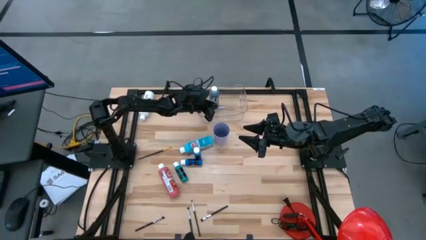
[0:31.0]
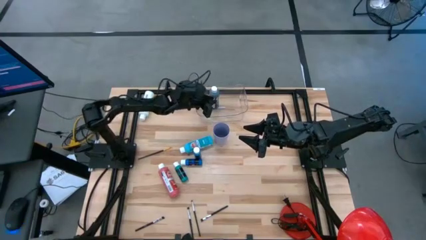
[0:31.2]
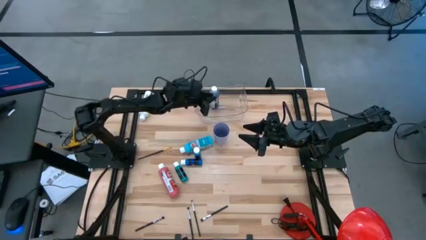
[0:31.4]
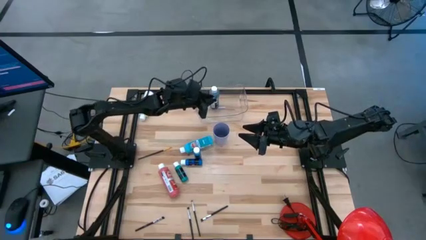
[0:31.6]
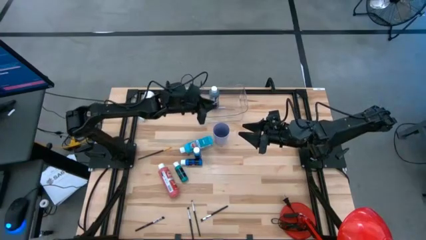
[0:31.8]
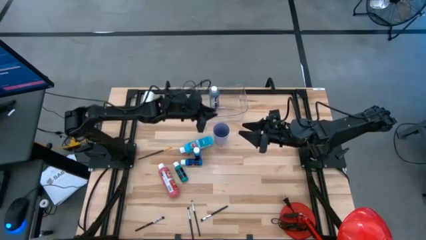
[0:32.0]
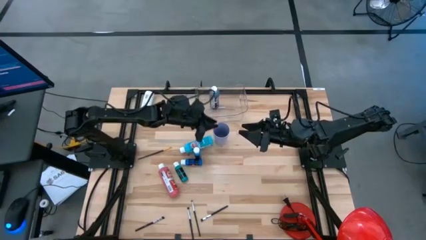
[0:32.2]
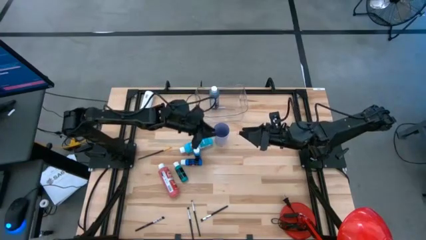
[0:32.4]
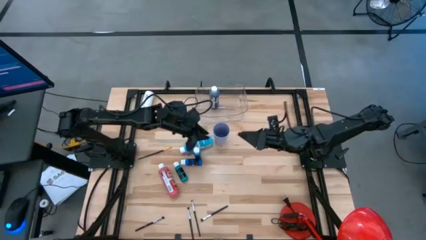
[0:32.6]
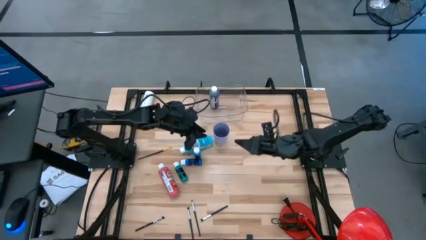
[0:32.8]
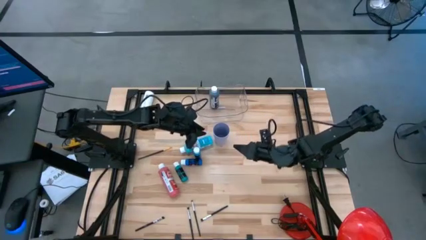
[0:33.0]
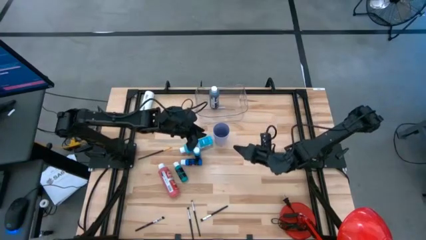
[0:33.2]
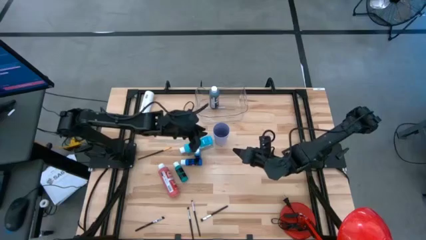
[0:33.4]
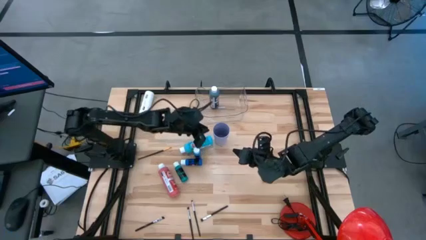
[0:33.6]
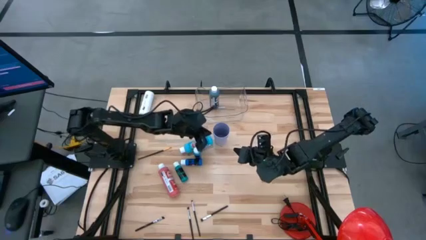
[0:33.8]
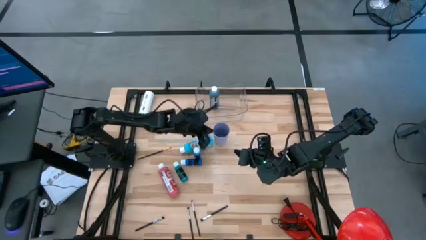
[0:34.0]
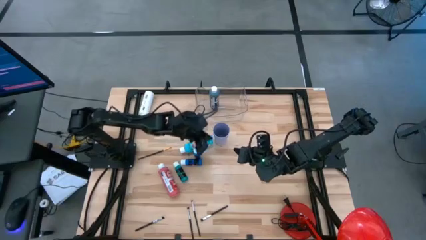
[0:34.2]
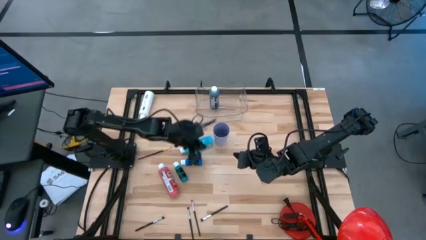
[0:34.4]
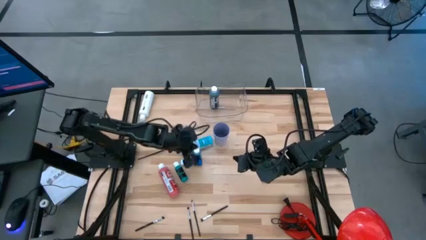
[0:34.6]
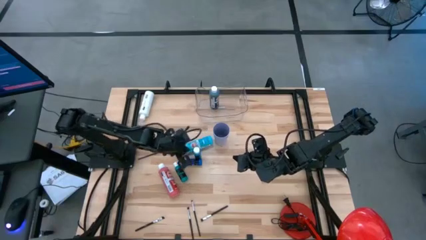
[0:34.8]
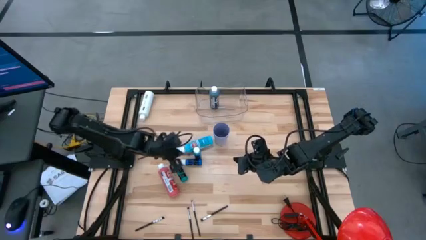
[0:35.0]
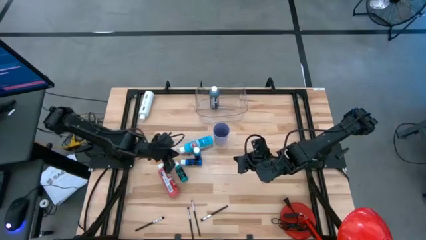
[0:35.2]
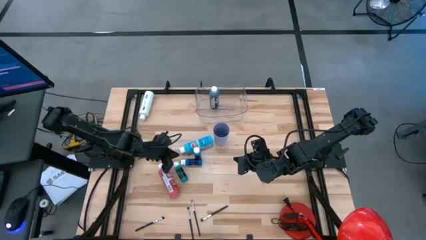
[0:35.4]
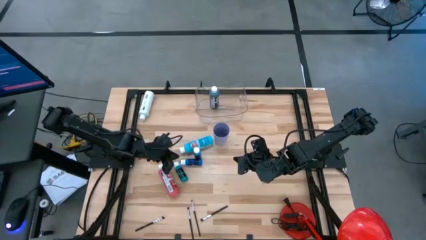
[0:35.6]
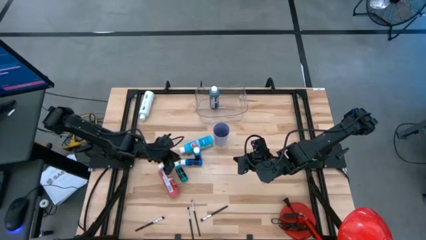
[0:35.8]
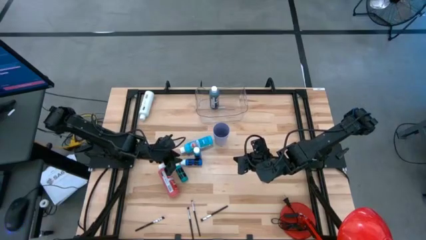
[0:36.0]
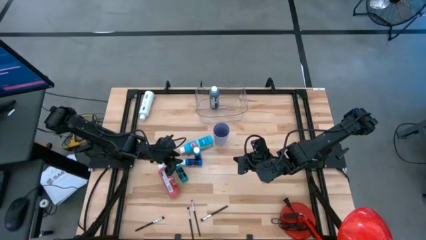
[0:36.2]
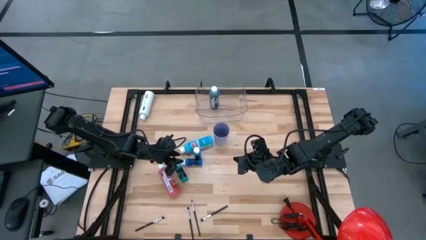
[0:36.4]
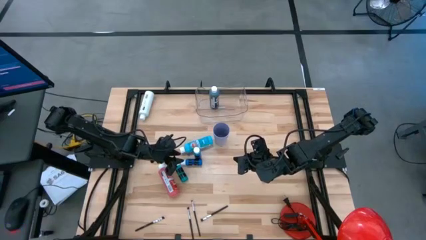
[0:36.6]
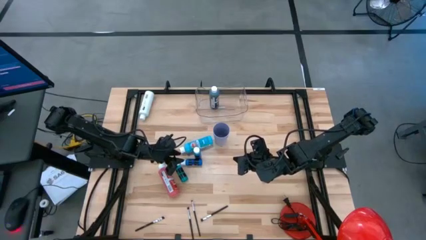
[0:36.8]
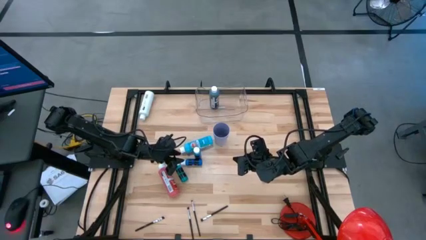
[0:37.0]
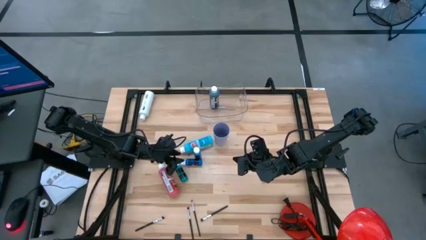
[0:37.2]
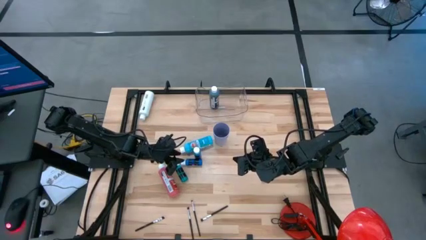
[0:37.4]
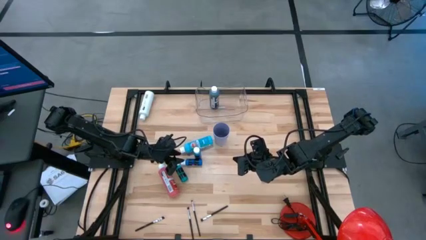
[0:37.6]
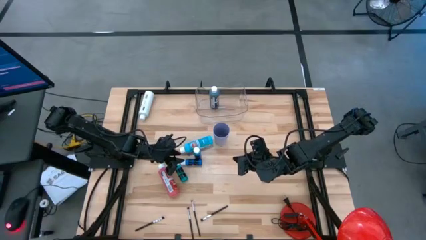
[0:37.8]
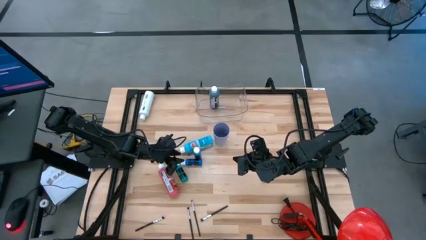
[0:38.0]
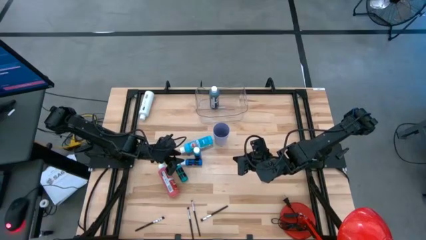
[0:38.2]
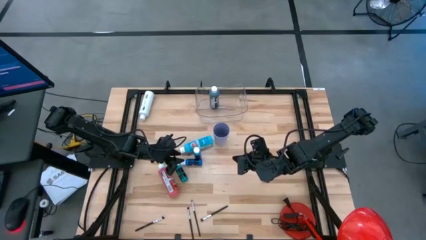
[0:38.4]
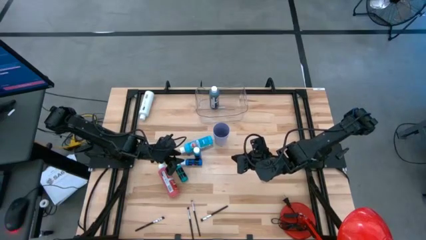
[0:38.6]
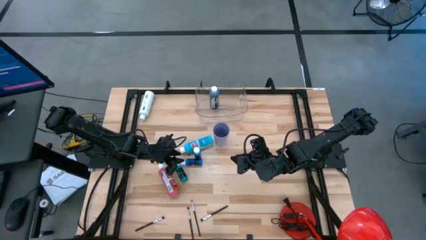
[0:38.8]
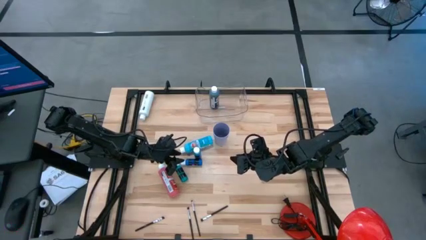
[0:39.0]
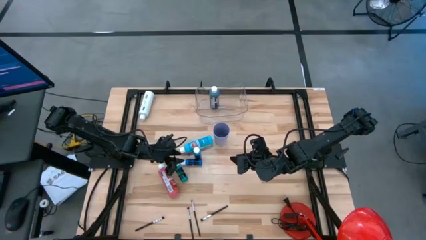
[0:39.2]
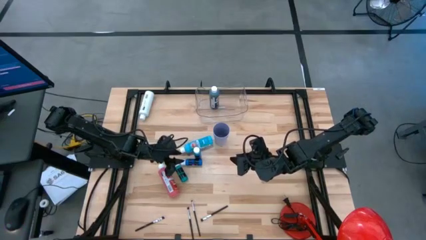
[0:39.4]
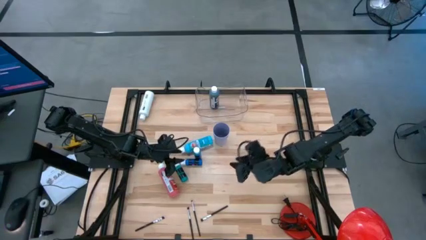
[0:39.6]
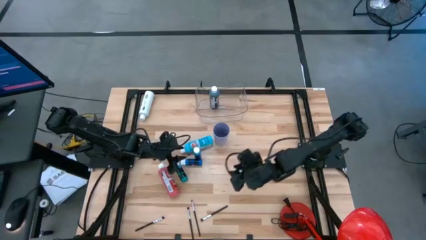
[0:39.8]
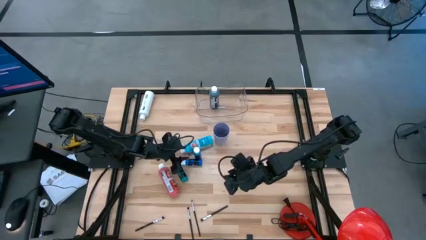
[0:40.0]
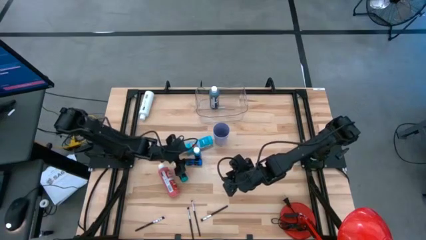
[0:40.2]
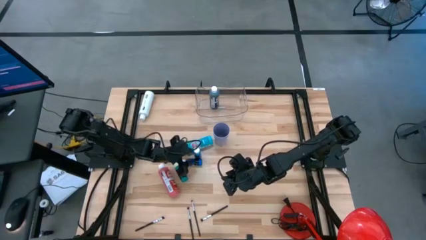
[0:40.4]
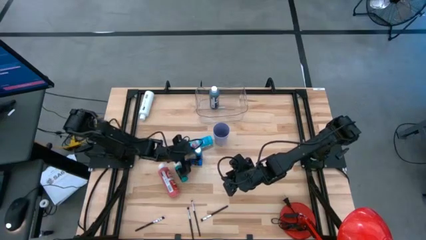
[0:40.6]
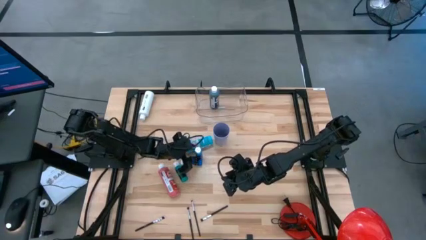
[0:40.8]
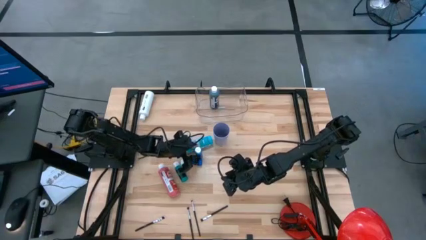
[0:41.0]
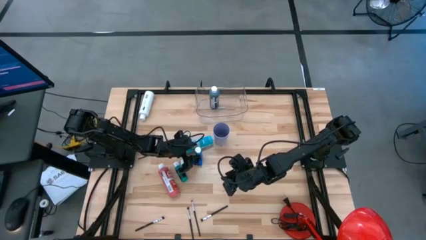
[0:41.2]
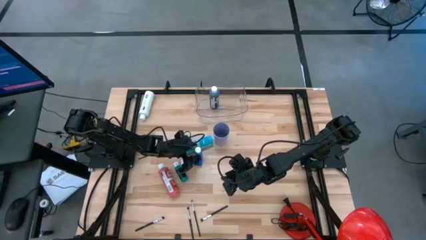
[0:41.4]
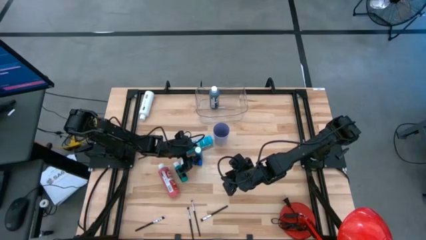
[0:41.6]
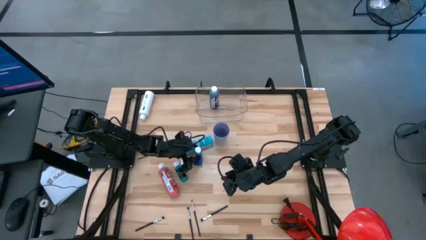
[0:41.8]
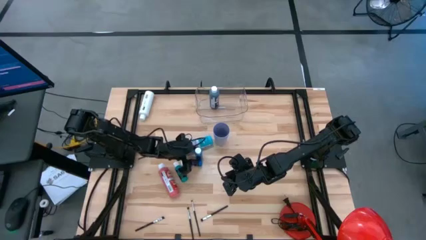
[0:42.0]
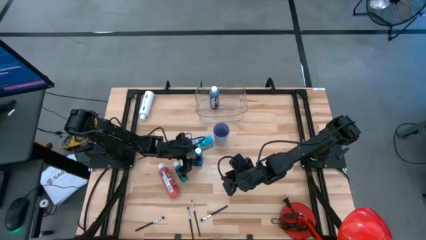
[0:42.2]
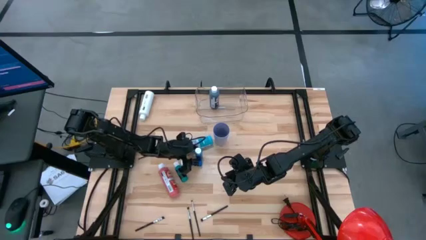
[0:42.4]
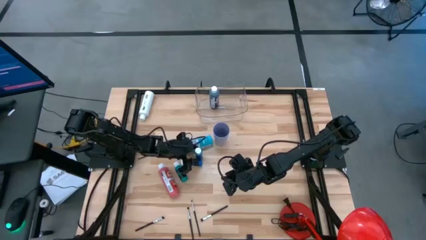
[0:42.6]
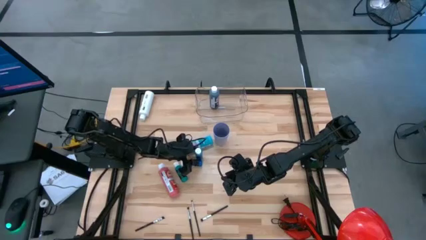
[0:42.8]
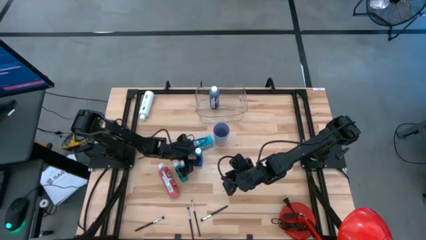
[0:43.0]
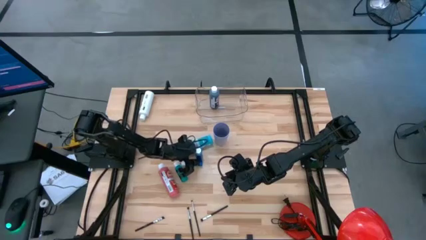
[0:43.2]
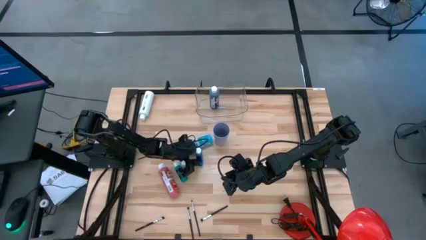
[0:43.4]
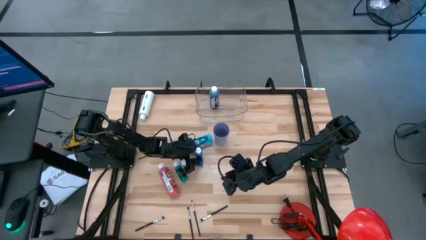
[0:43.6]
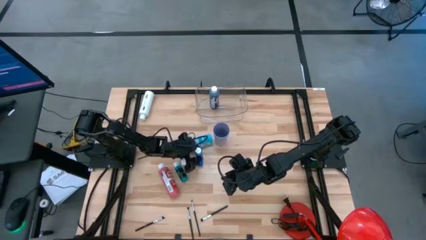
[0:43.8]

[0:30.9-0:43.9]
Task: Pick & Place Paint Supplies
Put the blue paint bottle into the transparent bin

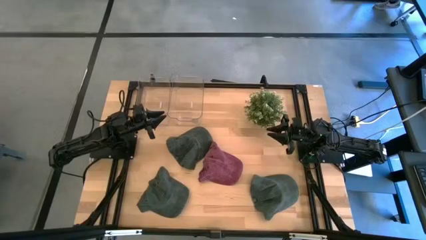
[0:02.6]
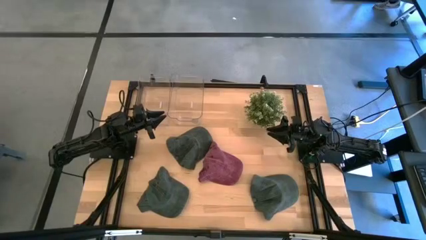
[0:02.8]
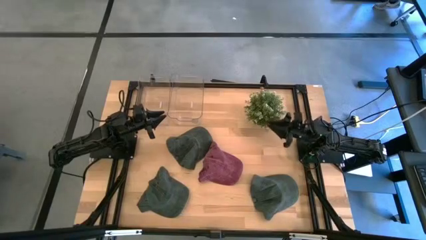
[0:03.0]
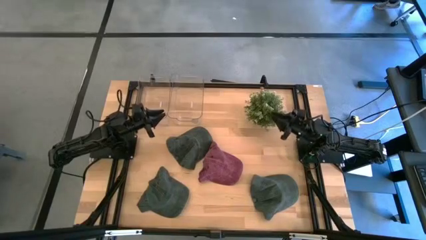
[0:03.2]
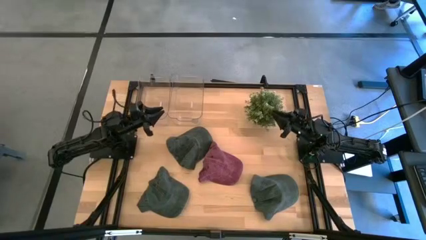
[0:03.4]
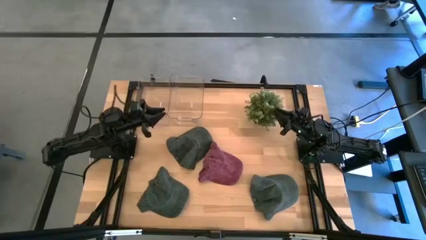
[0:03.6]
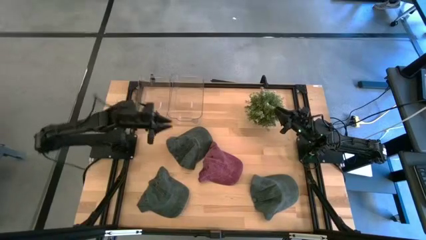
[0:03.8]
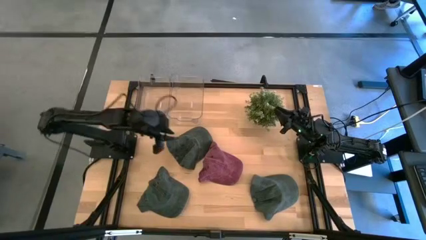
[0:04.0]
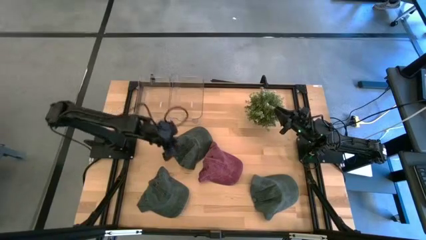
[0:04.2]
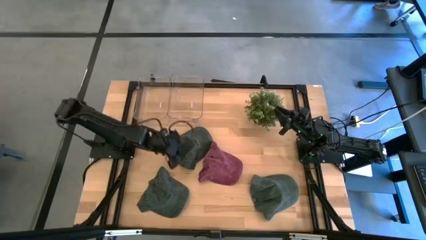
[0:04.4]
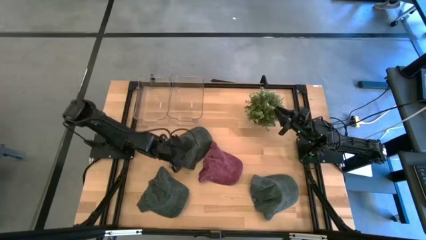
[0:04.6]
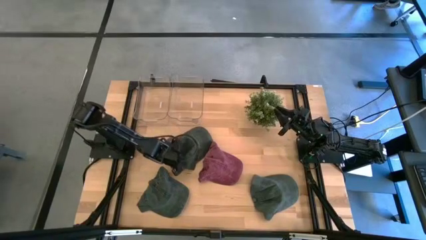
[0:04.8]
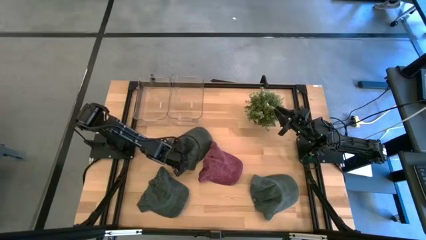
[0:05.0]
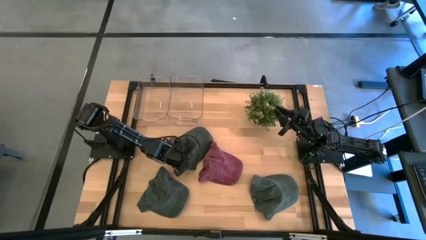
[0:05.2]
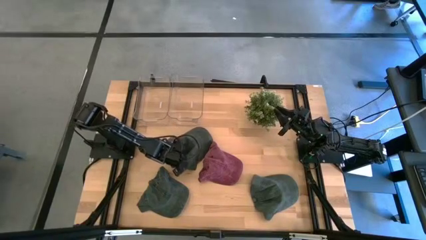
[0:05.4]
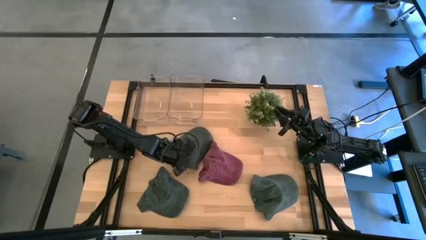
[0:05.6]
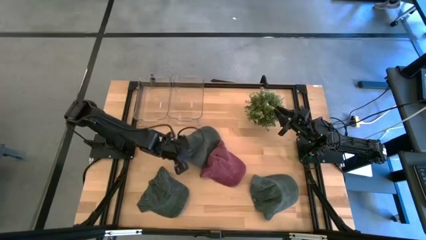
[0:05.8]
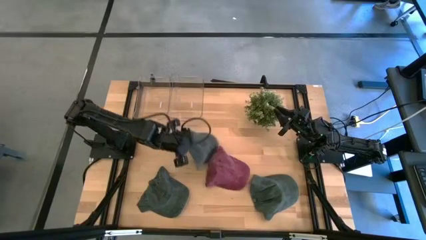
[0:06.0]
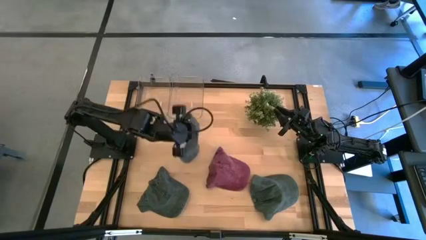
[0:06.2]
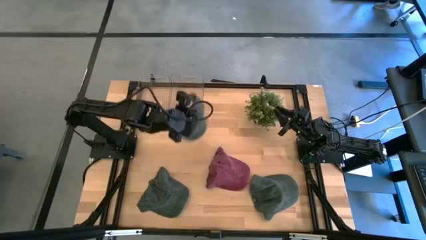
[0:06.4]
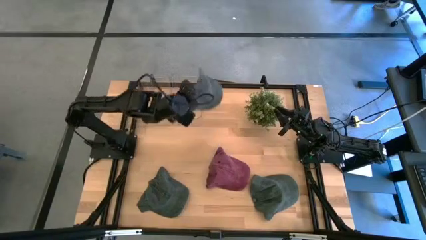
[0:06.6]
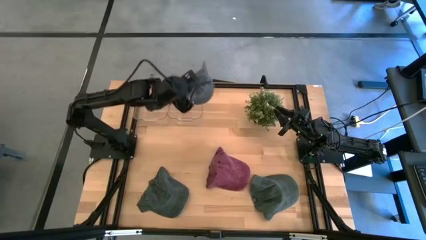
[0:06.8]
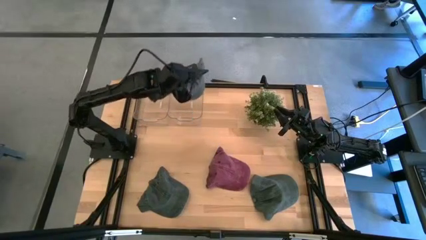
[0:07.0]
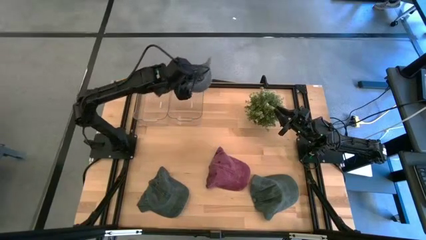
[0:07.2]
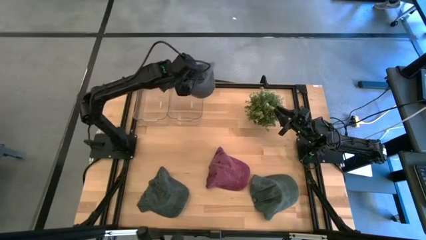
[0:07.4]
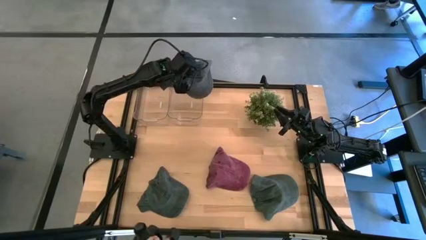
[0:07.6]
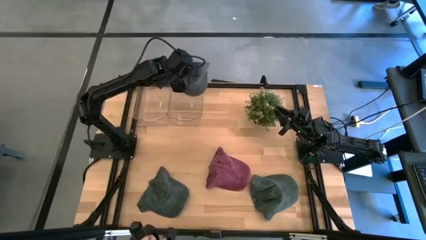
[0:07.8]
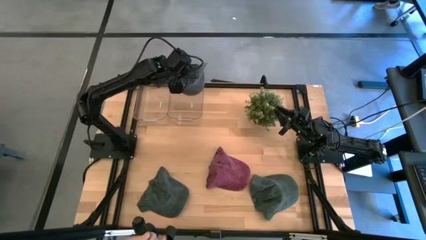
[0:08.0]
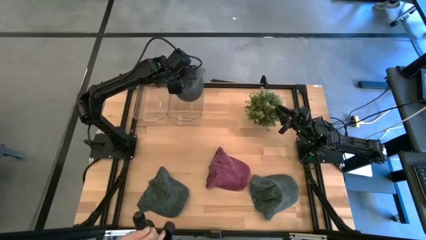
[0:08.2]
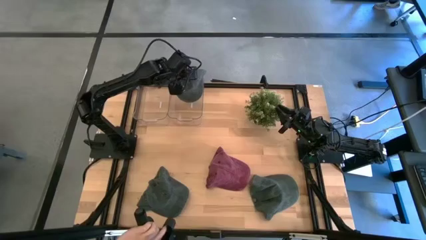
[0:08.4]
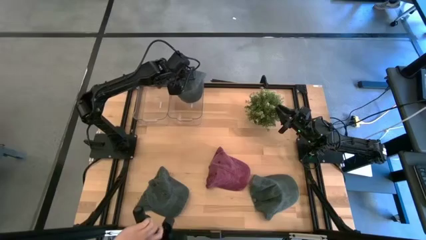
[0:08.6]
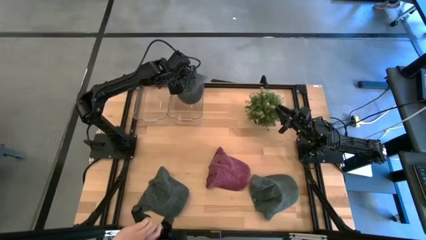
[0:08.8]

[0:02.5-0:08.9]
Task: Pick & Place hat
Put the top black cap into the right transparent bin
